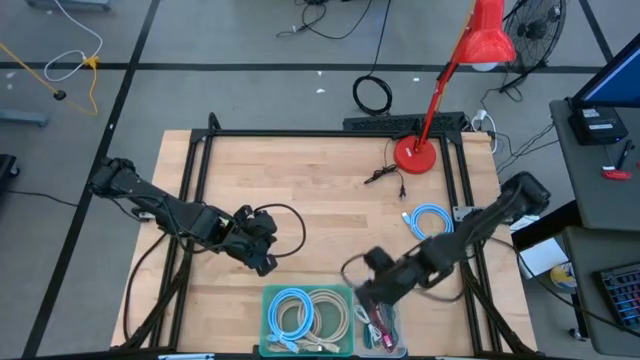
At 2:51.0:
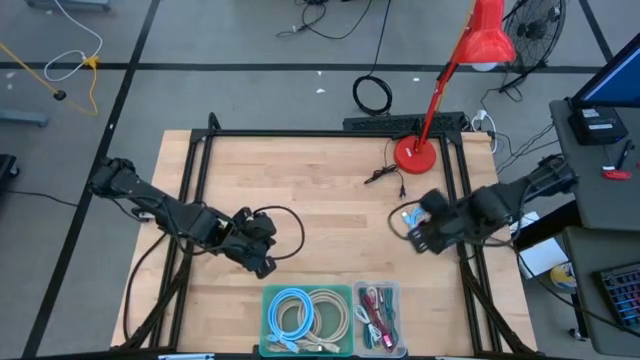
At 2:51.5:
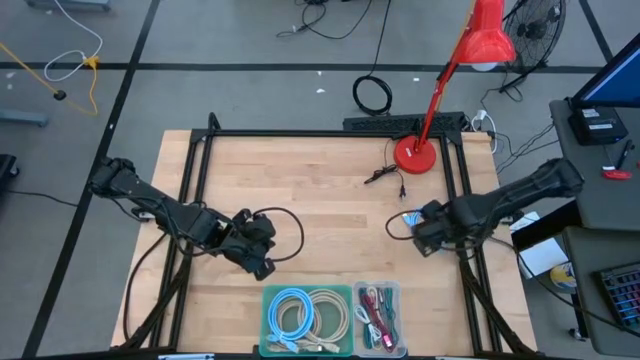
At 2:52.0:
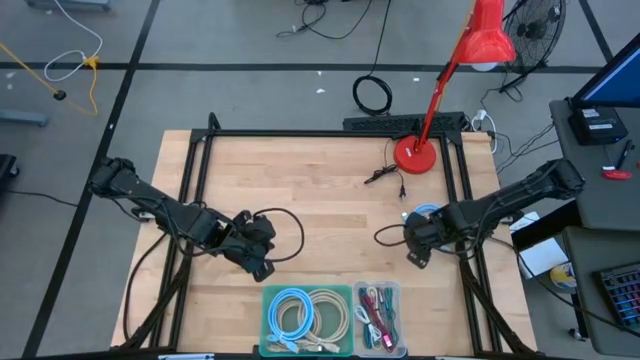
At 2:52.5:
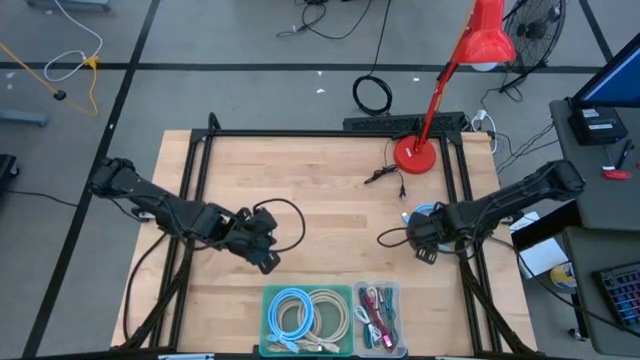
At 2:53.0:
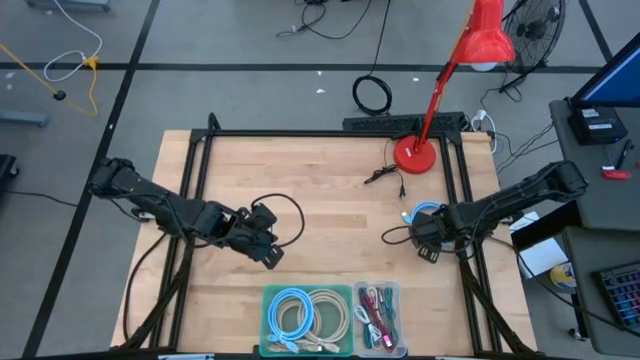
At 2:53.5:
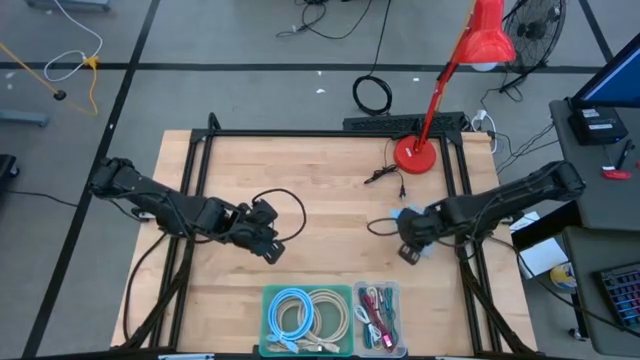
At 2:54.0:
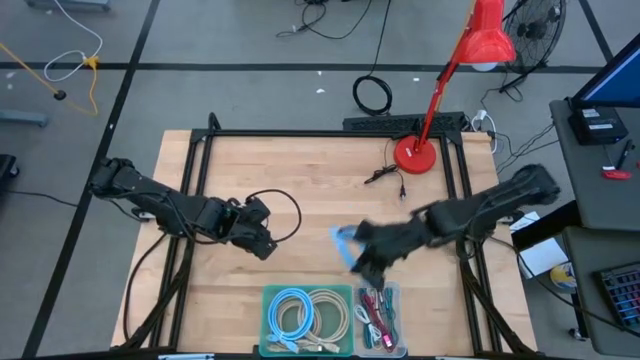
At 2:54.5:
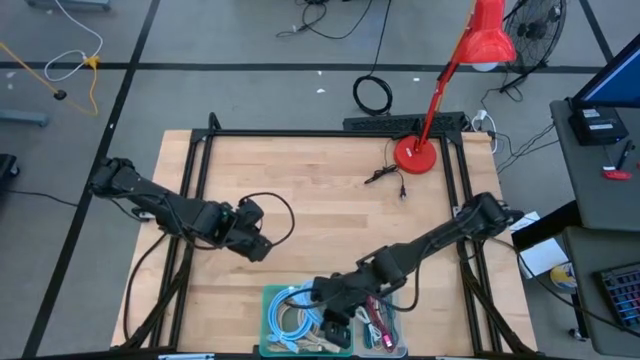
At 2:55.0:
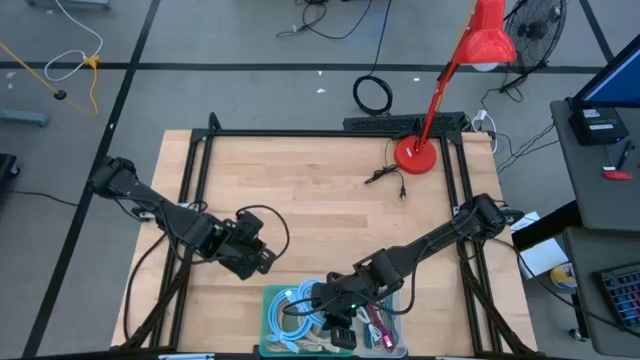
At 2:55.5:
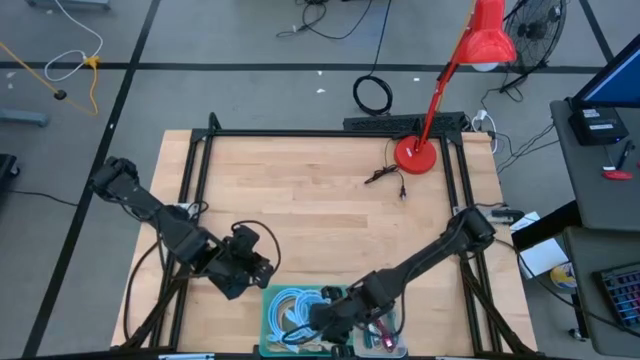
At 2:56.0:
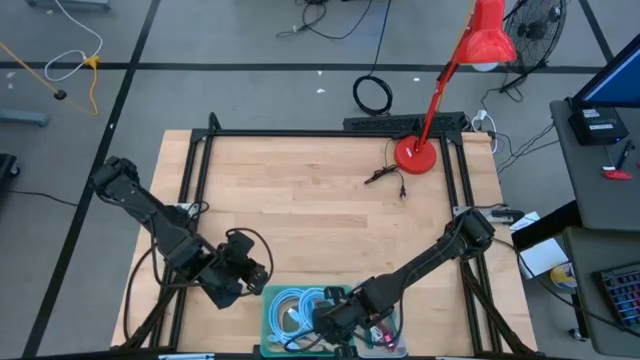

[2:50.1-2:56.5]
Task: Pick & Place USB Port
Put the blue hdmi cable into the green bin

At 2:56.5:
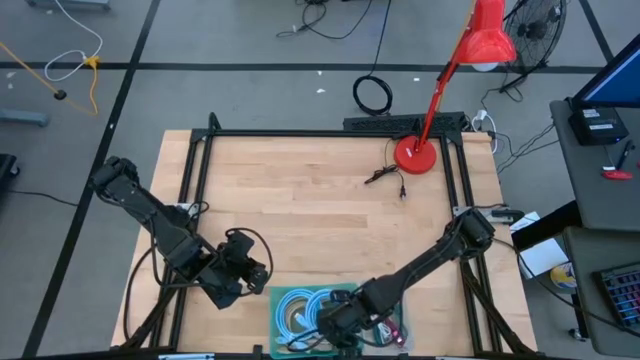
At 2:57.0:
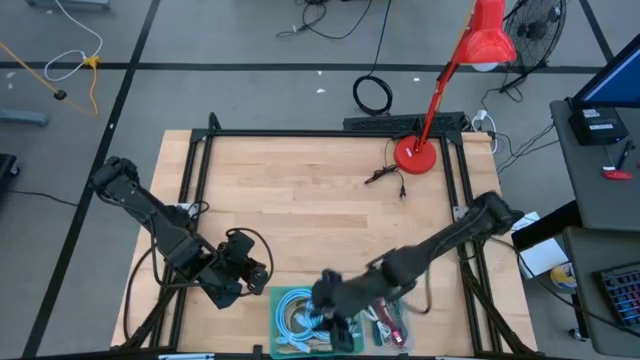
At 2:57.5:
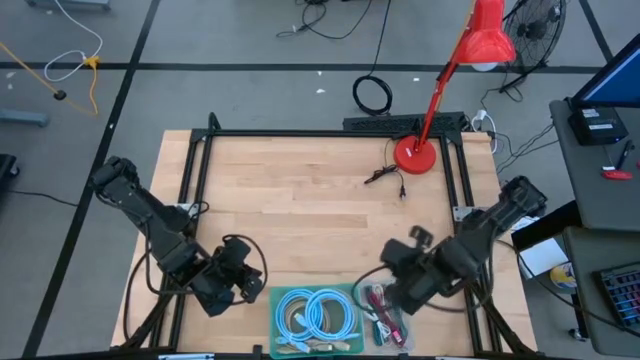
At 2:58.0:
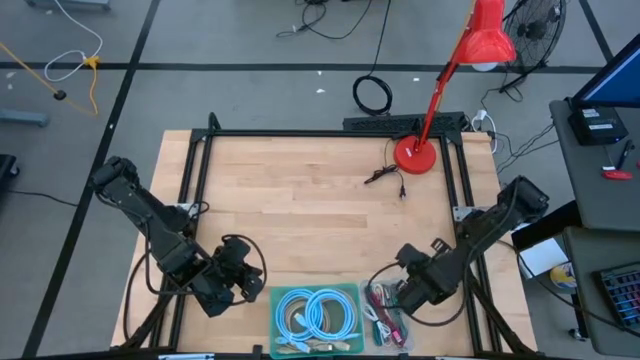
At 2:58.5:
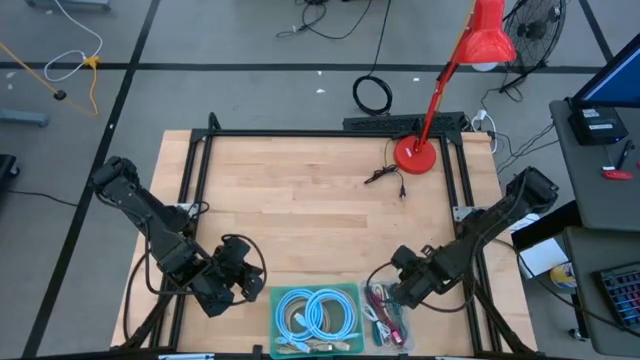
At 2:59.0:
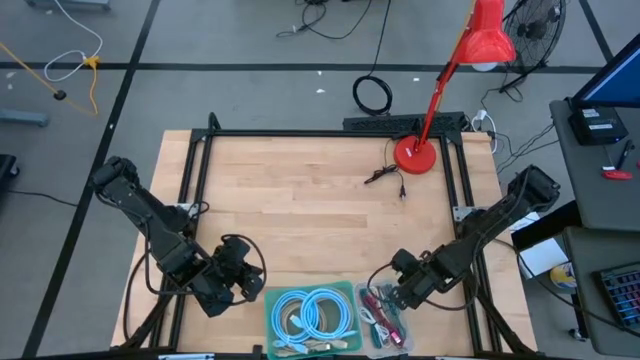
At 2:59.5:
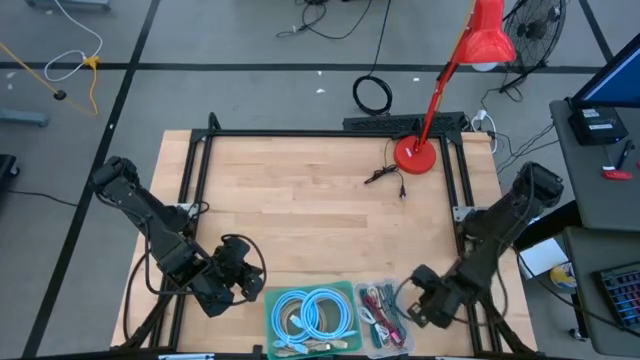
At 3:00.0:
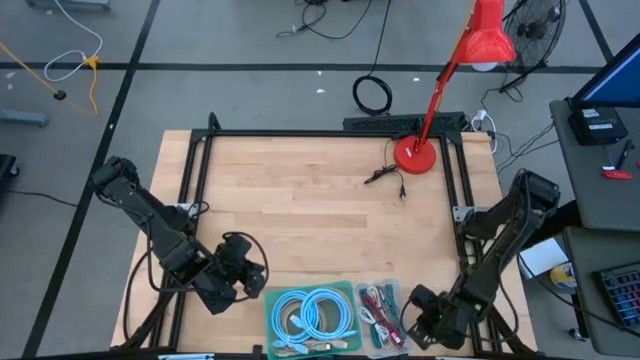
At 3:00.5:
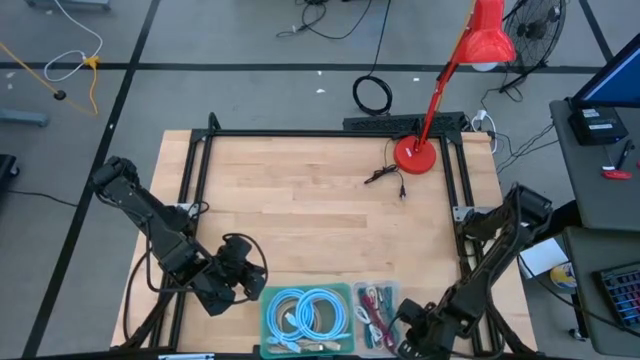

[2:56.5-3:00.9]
Adjust the white transparent bin

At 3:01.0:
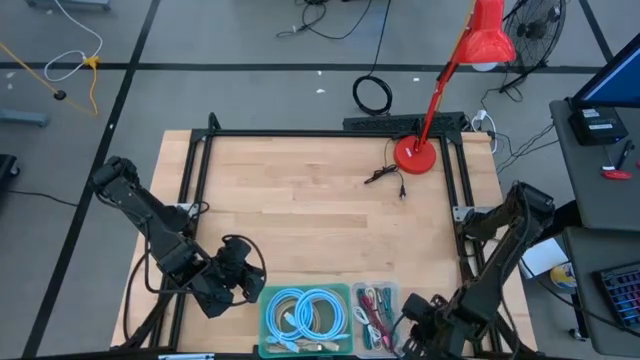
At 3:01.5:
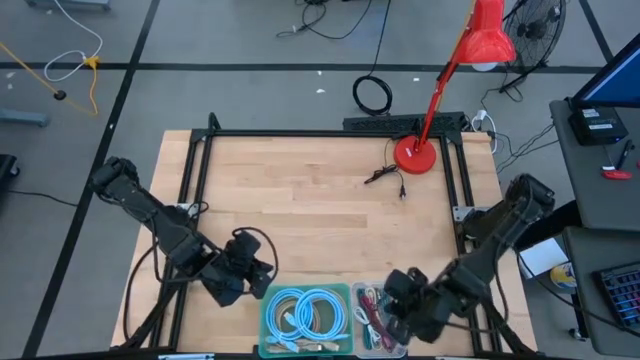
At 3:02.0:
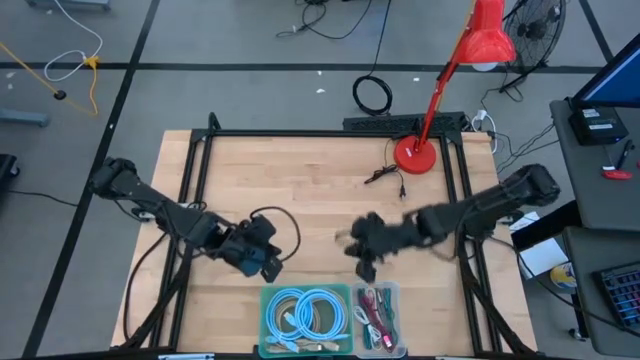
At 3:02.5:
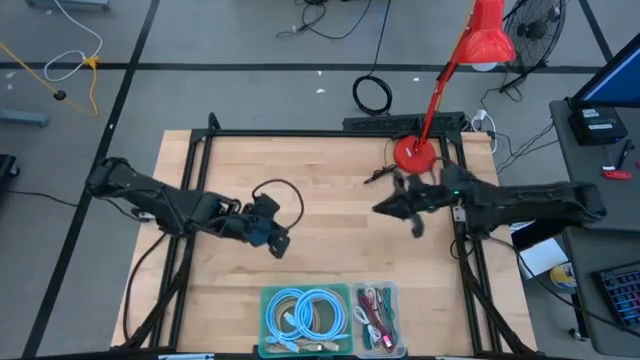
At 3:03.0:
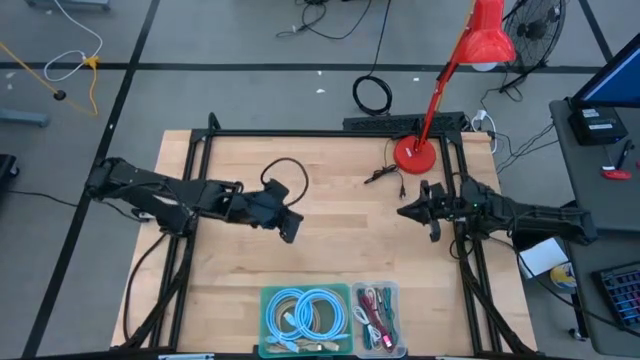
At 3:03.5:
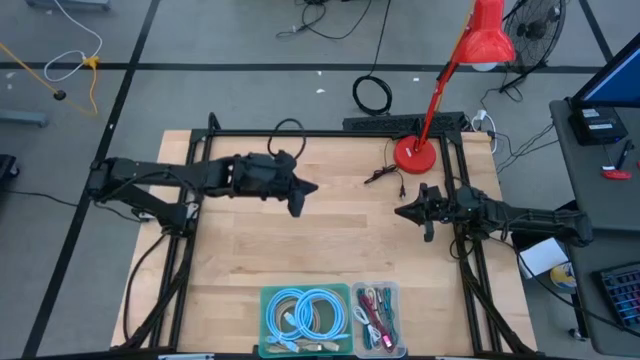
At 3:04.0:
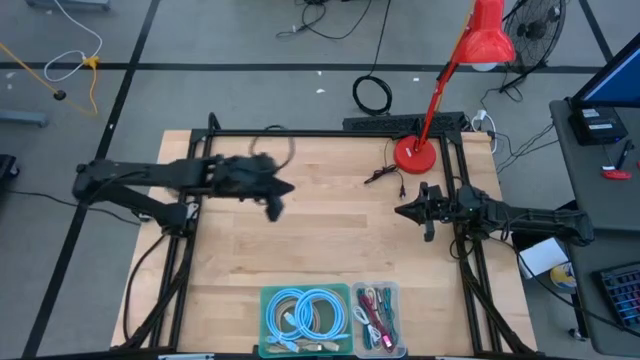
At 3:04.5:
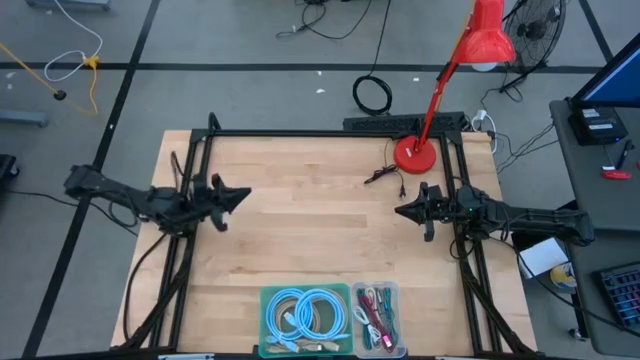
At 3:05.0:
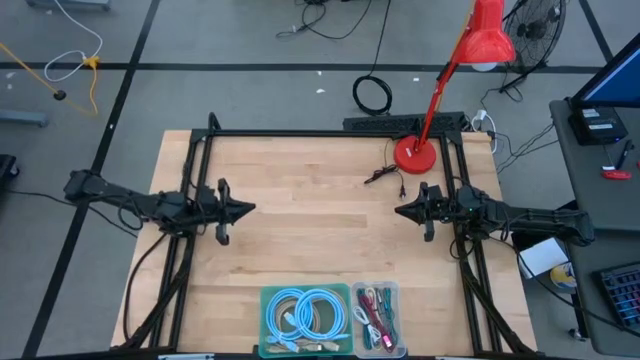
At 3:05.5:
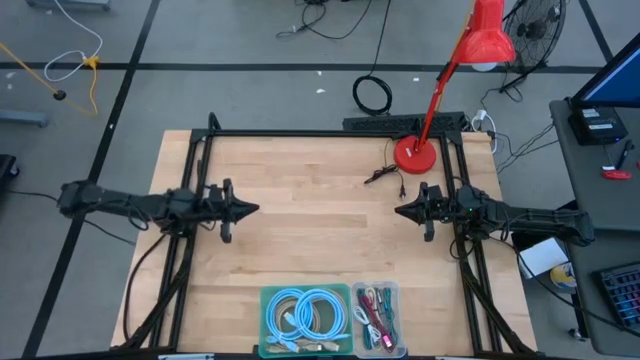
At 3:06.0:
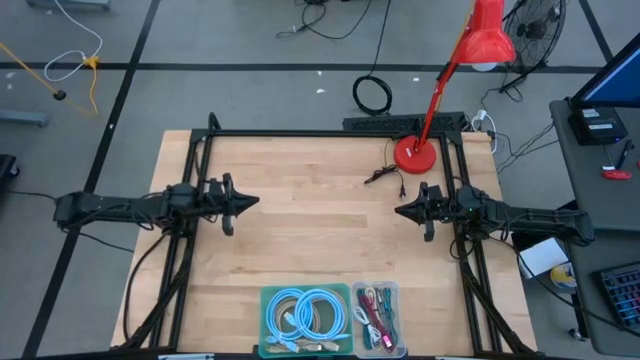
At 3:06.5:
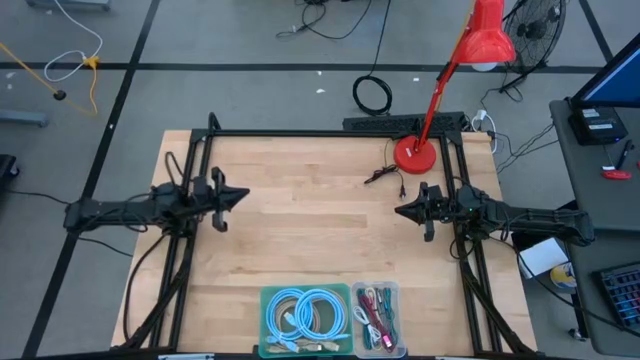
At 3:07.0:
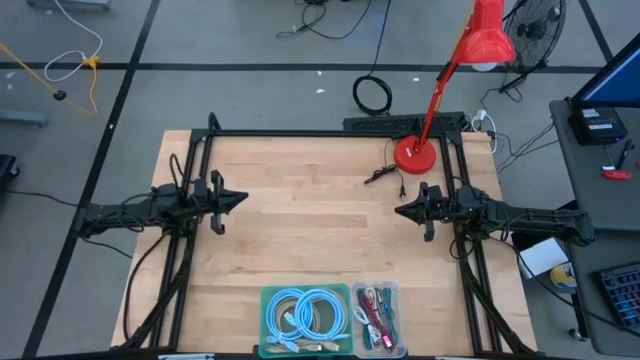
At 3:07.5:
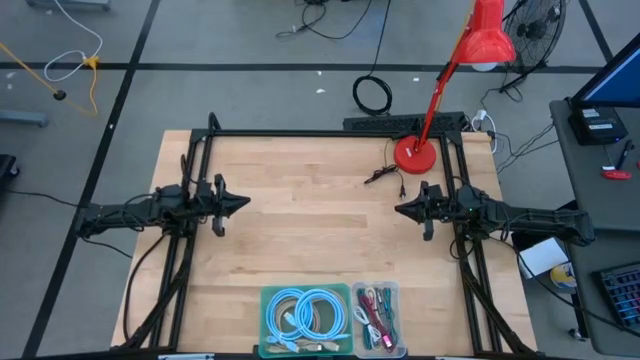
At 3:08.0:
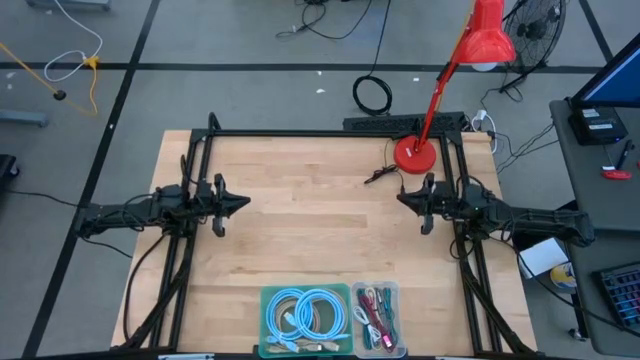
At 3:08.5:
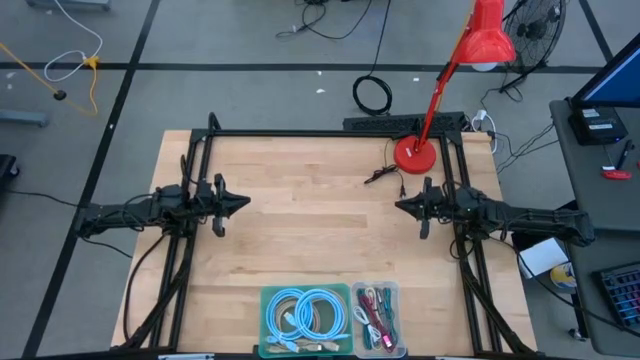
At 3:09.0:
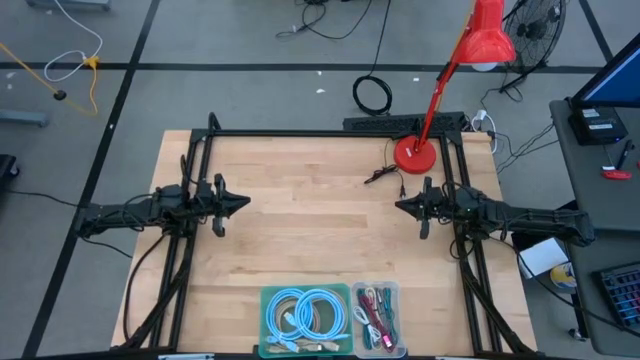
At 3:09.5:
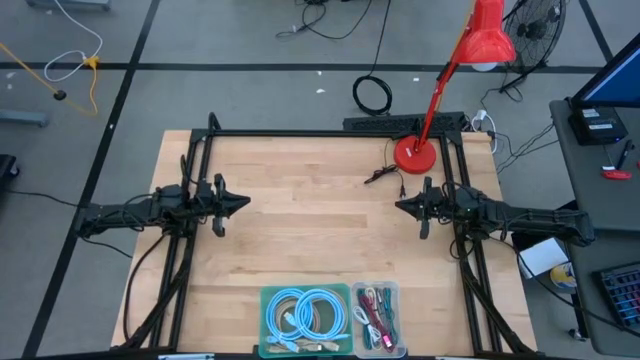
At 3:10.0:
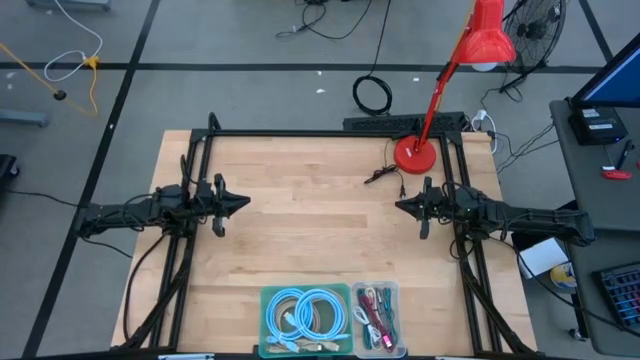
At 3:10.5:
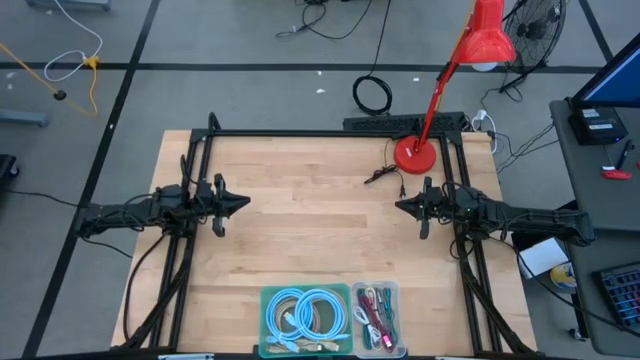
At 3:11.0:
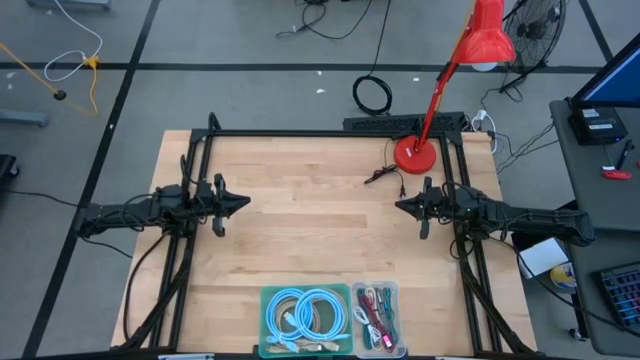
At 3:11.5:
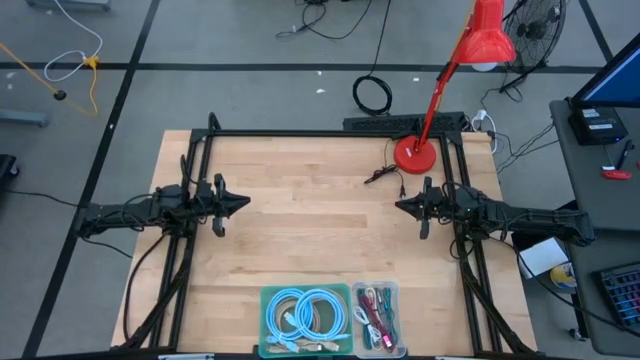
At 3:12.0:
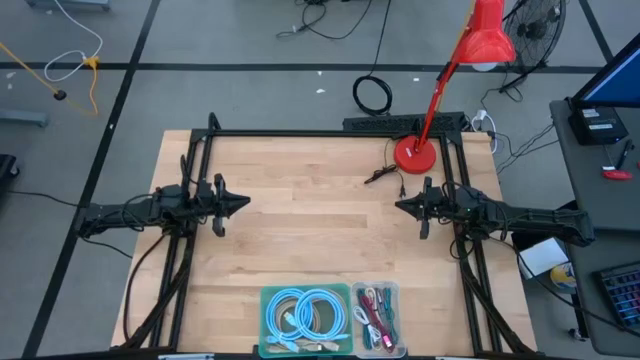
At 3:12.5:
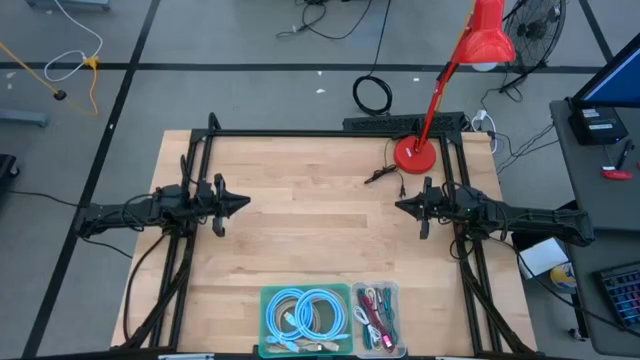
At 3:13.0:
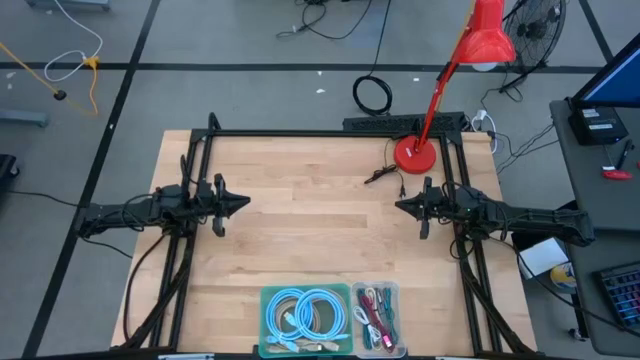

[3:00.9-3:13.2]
Return to Home Position
